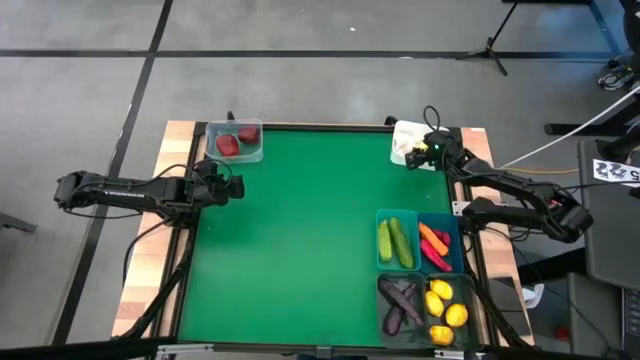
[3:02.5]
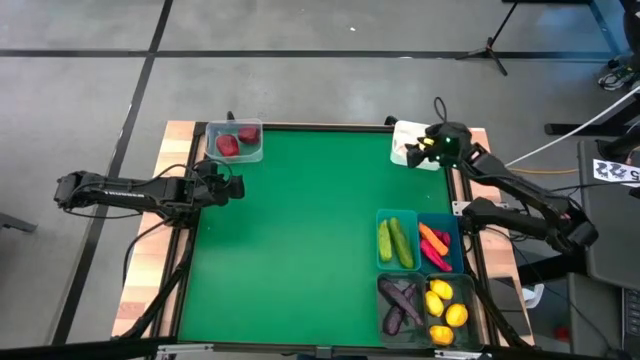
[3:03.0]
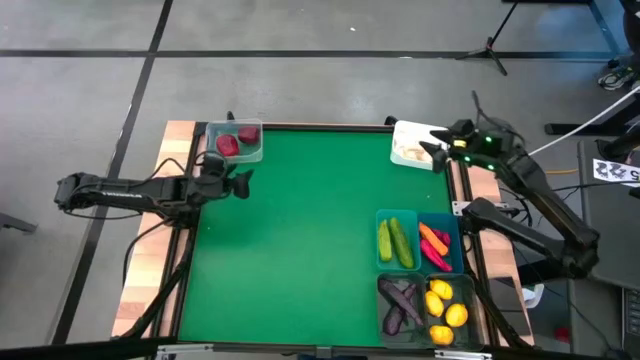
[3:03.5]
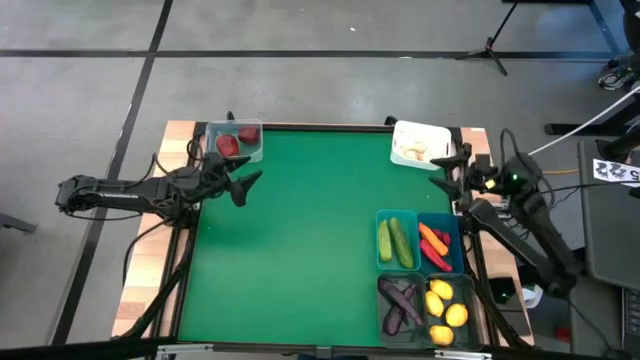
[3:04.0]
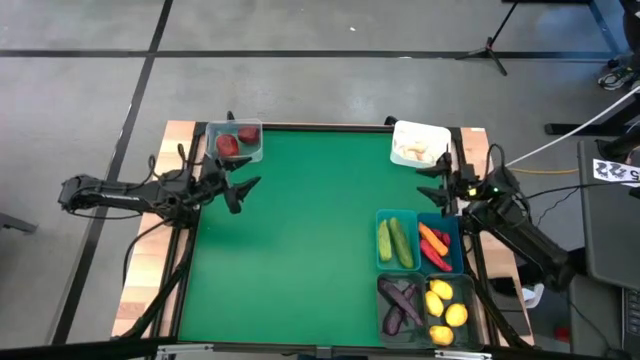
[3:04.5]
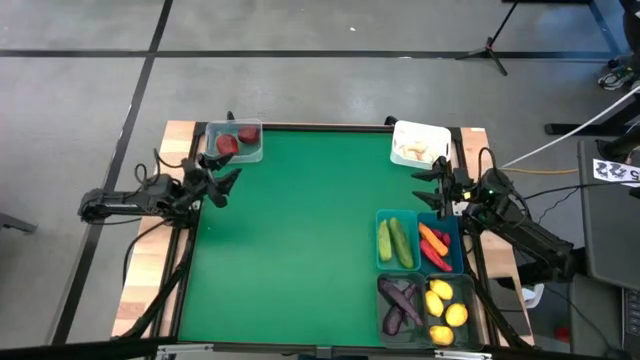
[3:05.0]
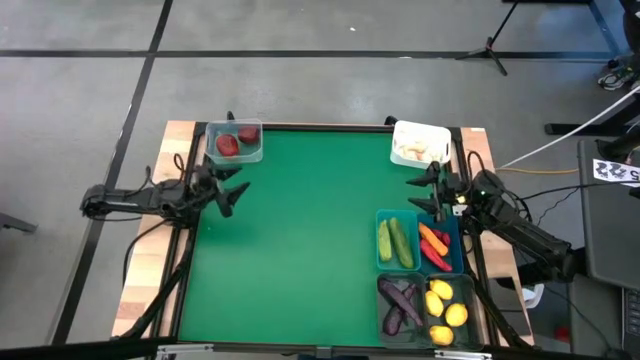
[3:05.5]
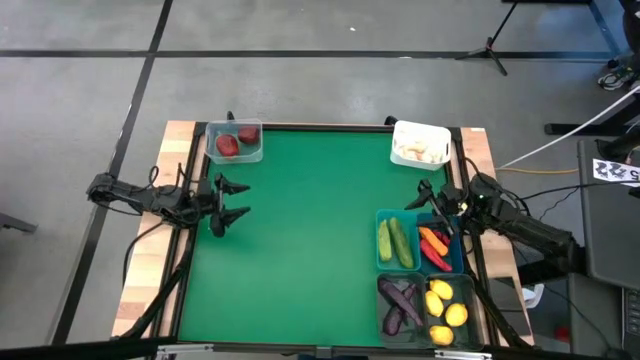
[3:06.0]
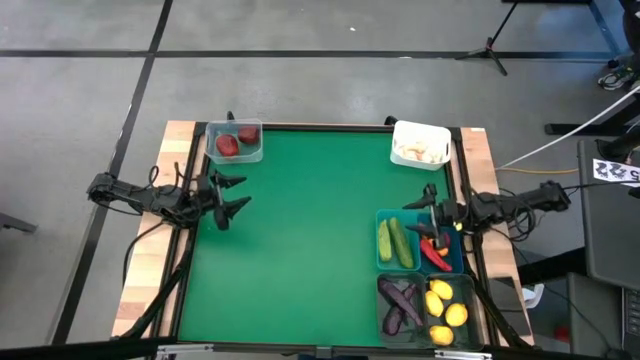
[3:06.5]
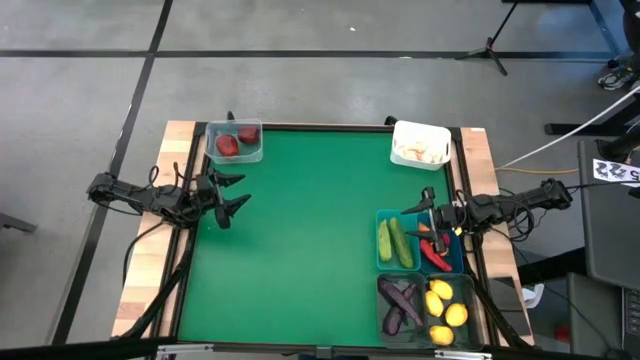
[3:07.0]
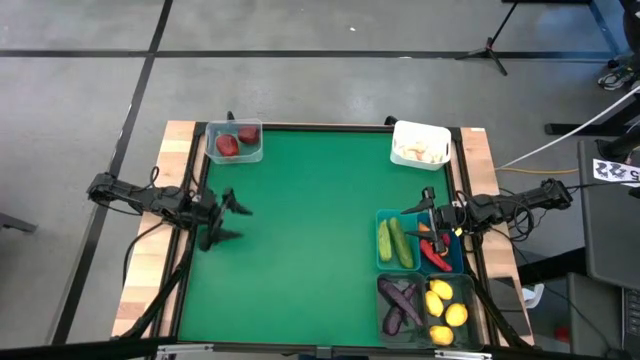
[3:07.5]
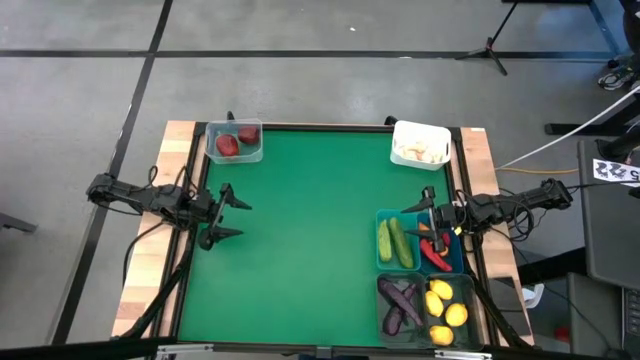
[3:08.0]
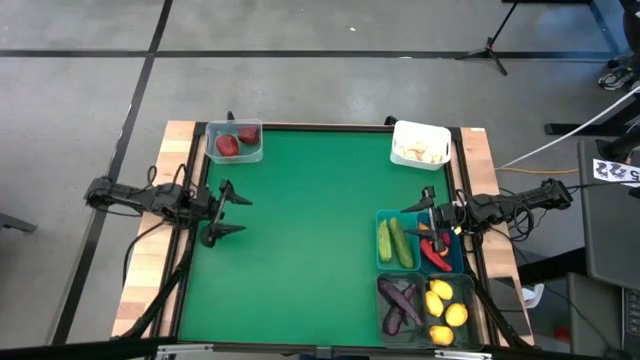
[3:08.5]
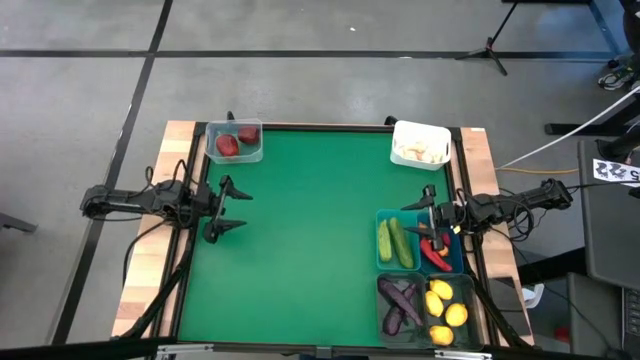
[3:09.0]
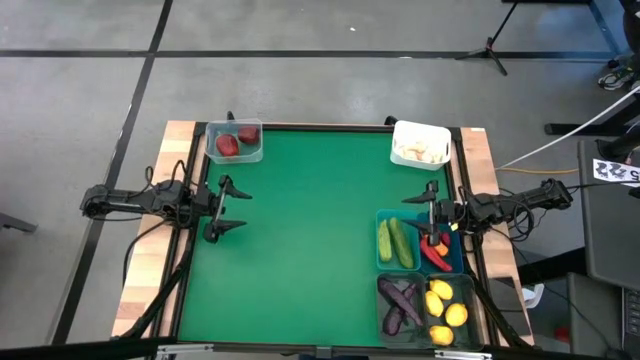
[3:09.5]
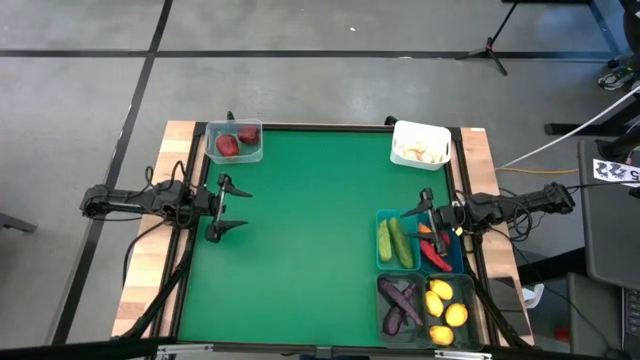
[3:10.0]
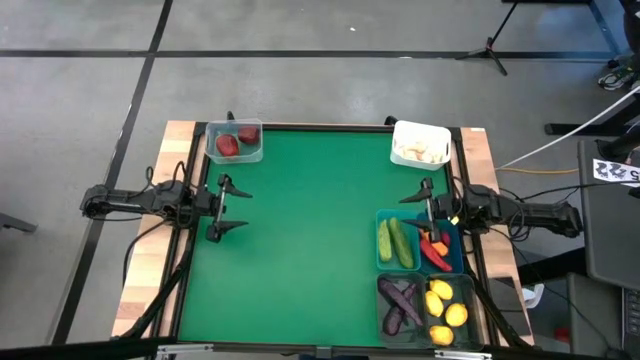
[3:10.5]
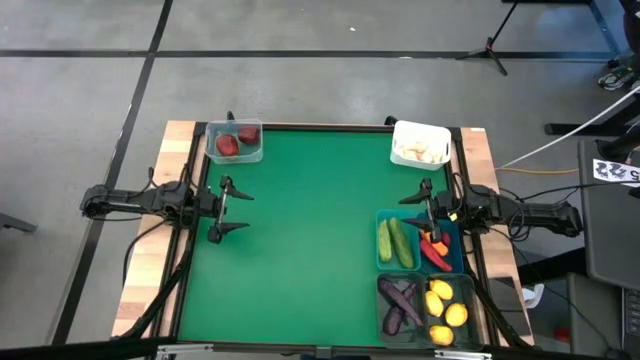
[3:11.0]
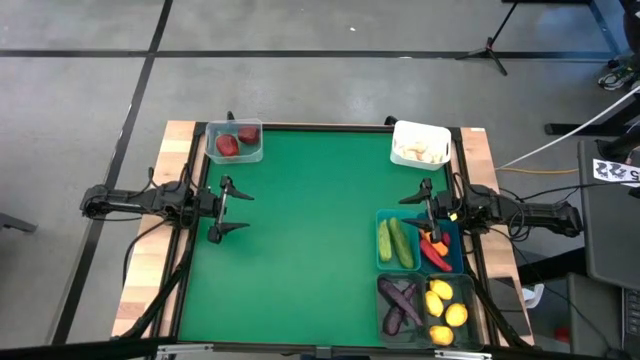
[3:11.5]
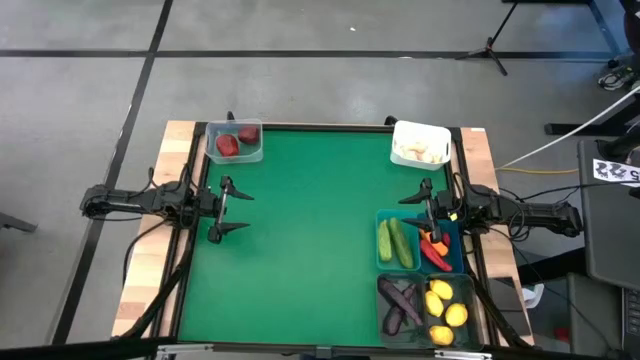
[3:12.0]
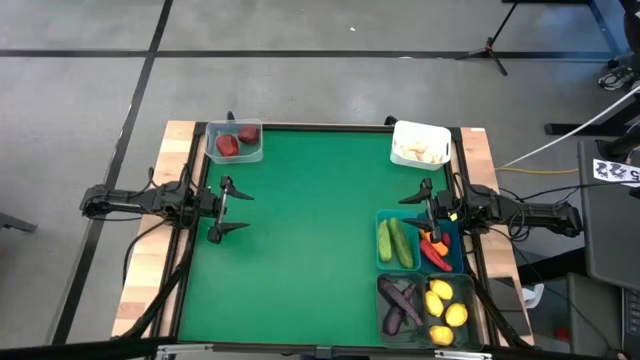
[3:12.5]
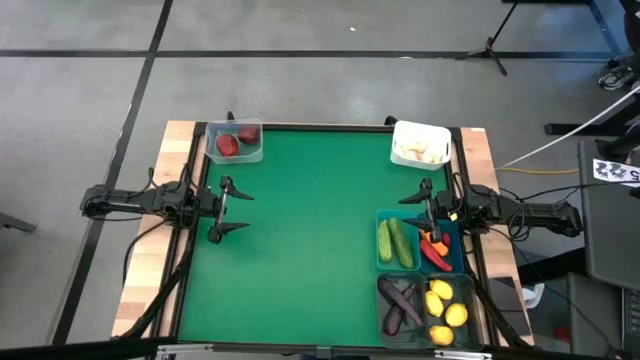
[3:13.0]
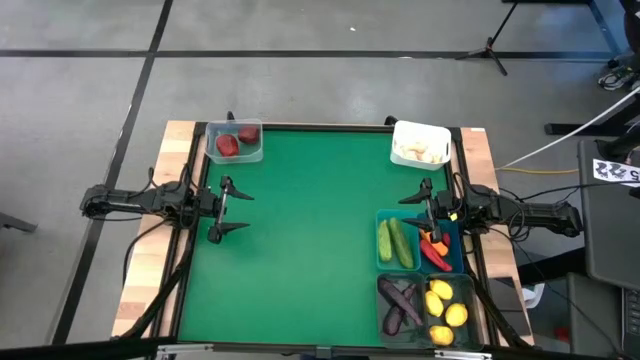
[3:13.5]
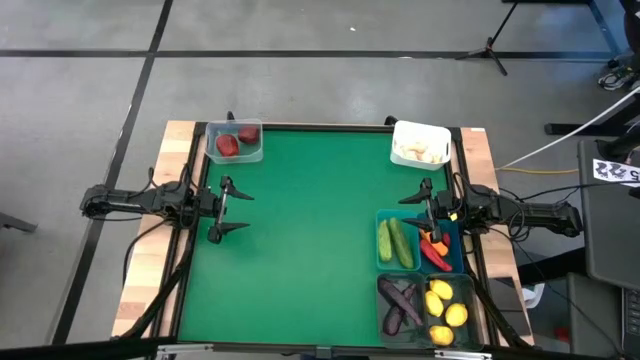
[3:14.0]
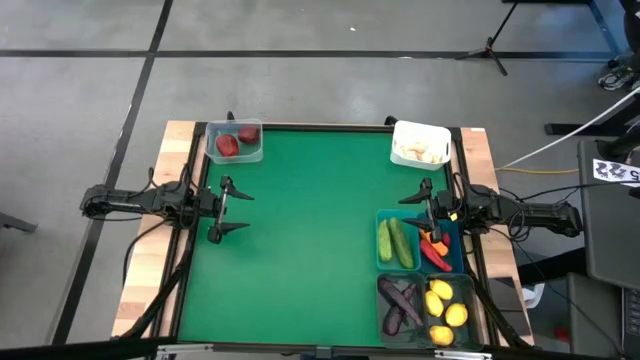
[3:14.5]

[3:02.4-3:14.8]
Task: Sort produce into baskets
Return to Home Position

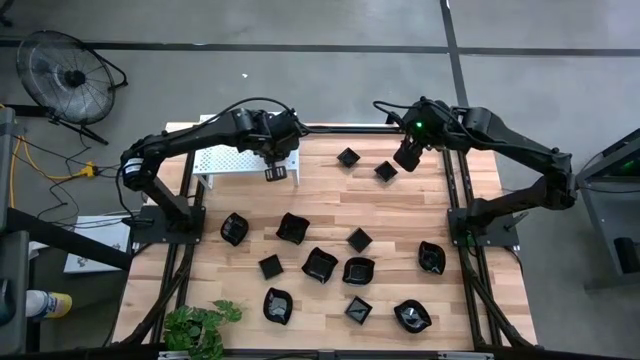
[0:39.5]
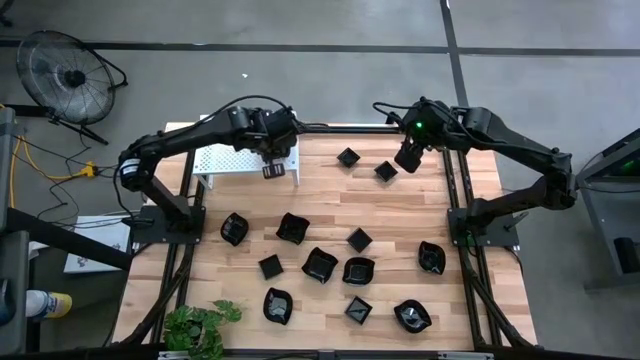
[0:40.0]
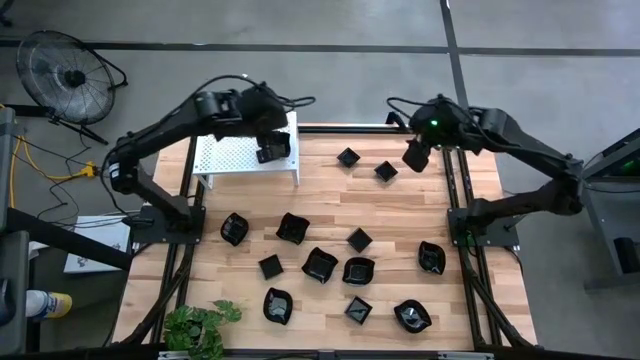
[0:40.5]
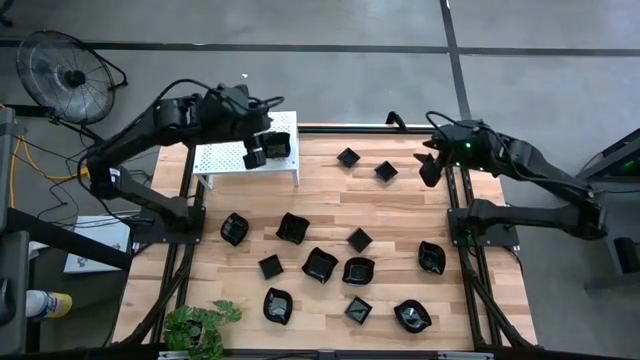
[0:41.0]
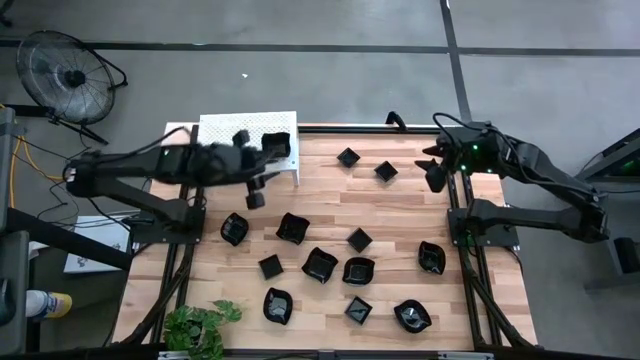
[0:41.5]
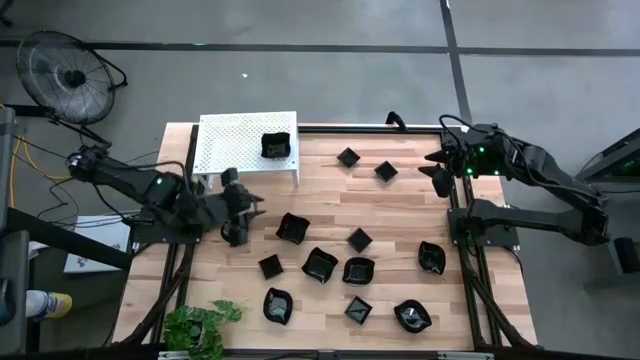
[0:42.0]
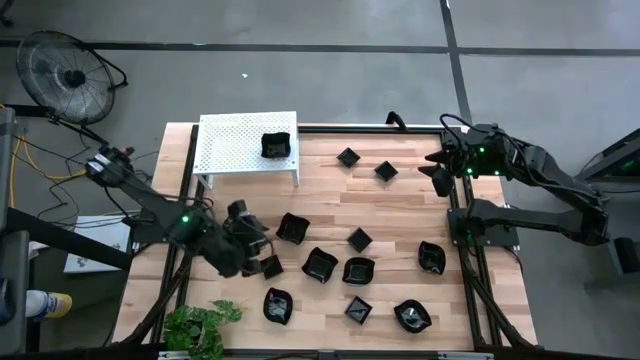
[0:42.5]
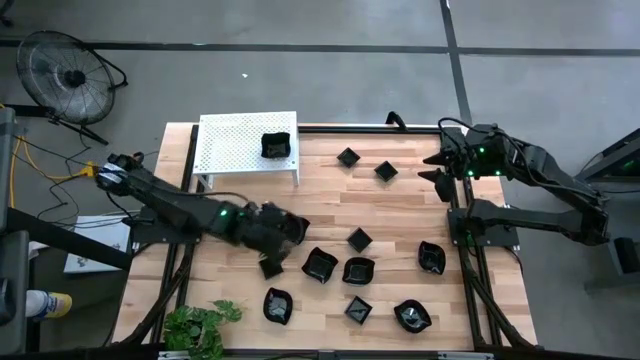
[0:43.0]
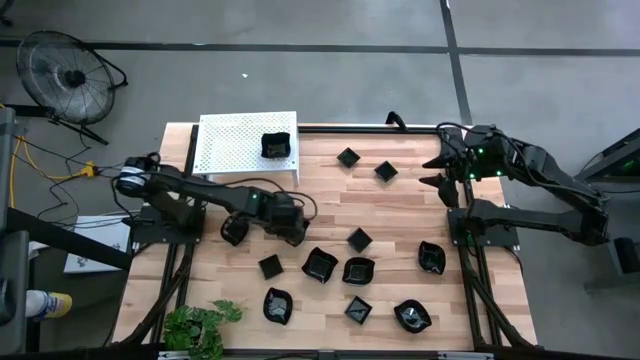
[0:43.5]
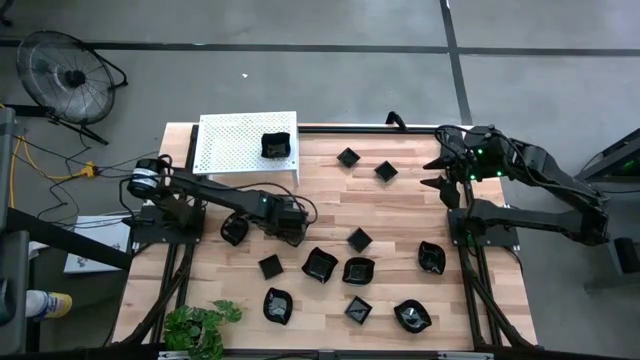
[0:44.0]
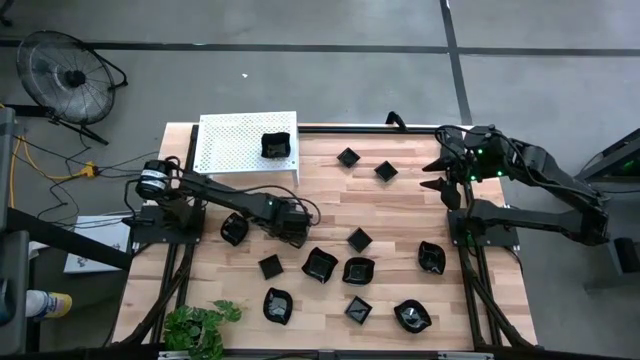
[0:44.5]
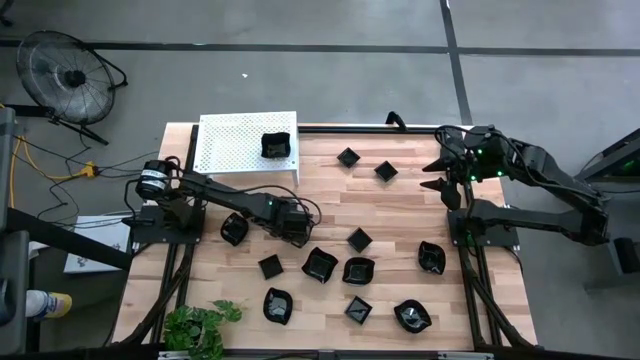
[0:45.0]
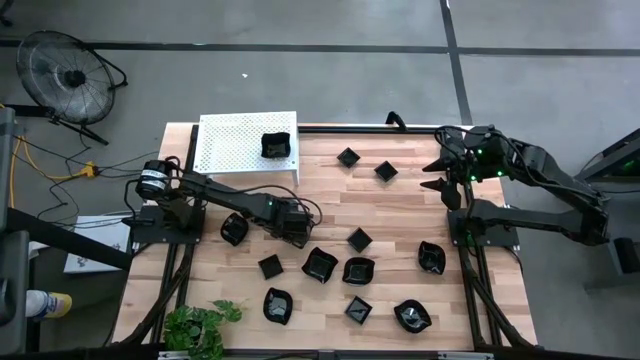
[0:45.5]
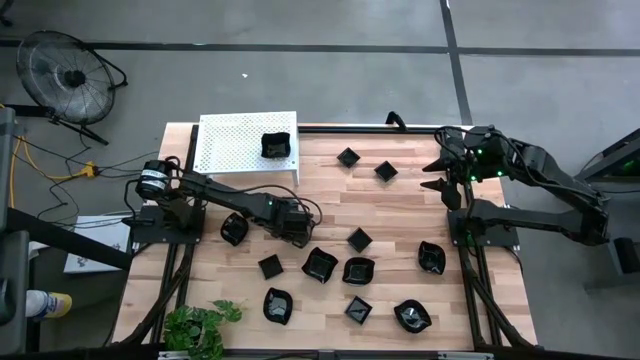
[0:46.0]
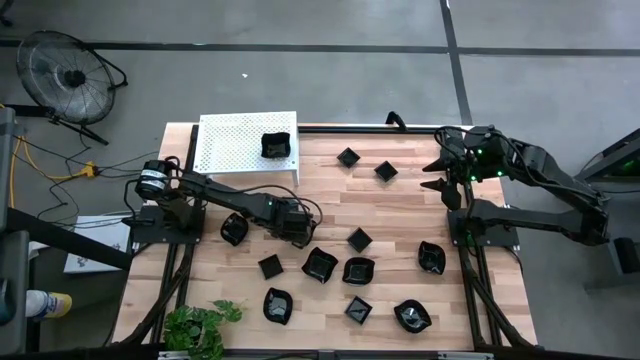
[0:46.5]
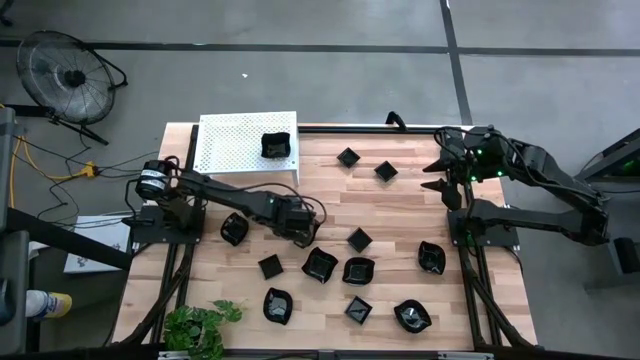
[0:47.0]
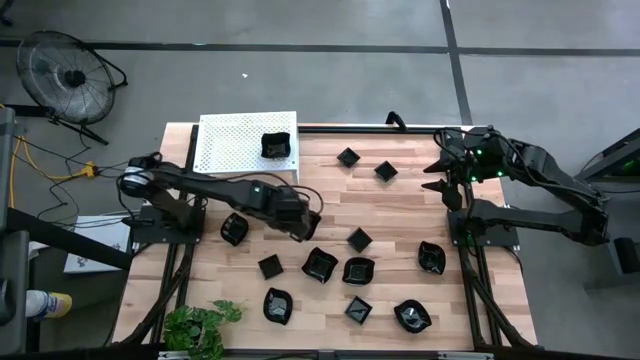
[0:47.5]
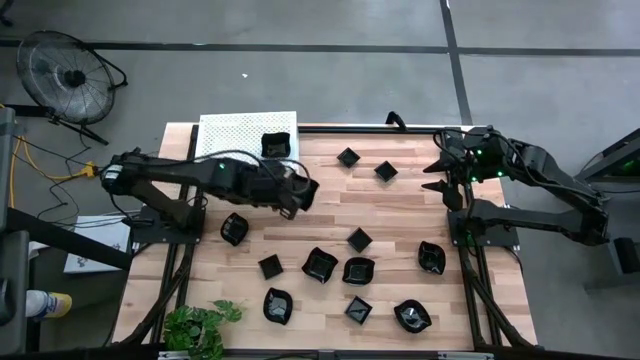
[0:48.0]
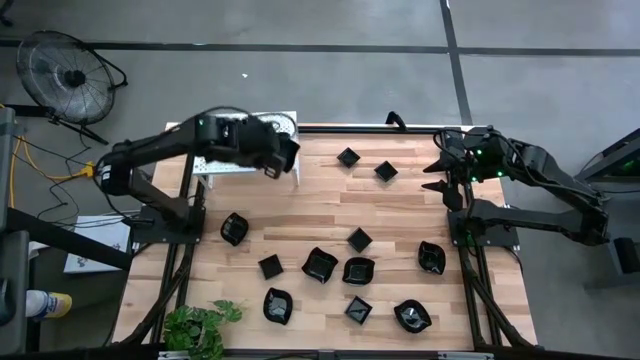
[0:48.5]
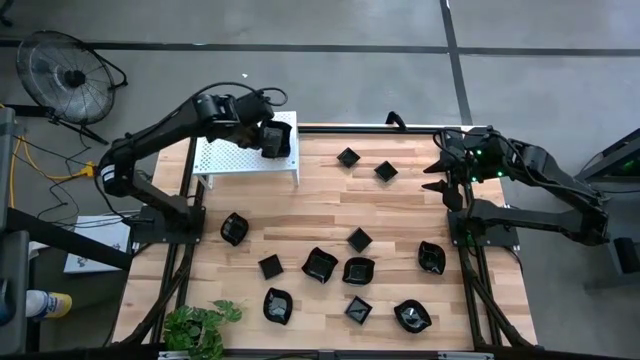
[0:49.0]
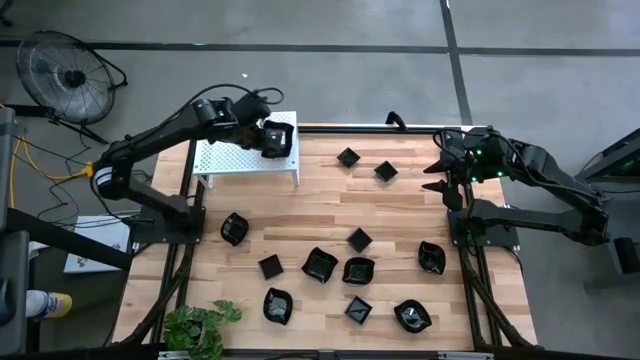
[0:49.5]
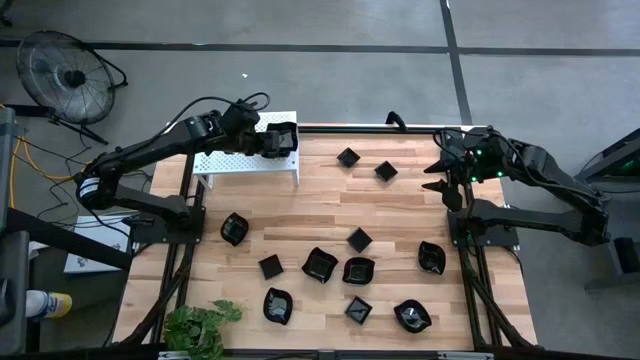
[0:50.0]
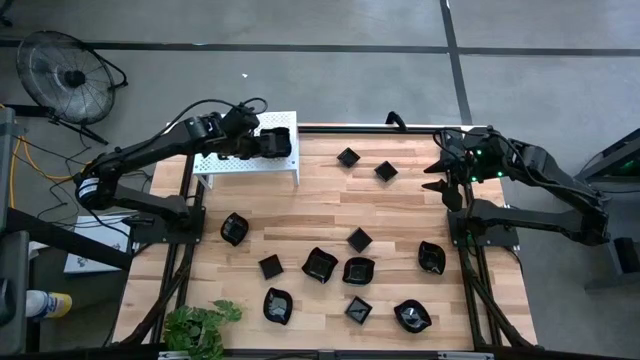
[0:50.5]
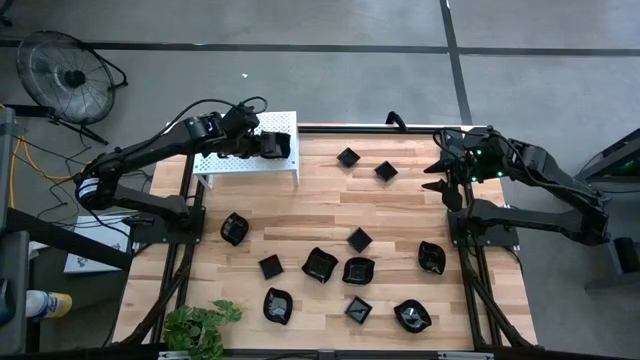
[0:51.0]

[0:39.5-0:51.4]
Task: Pick & Place Mini shaped plates
Stack the black distorted square plate on top of the black distorted square plate on the shelf
